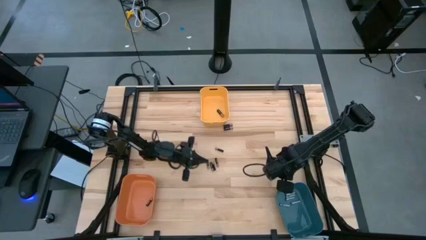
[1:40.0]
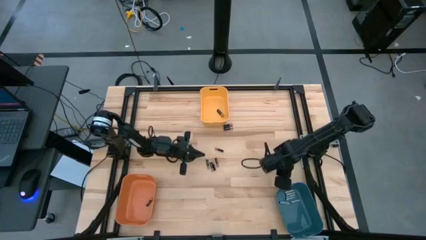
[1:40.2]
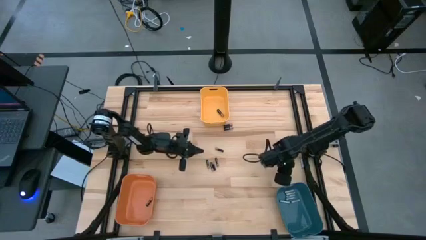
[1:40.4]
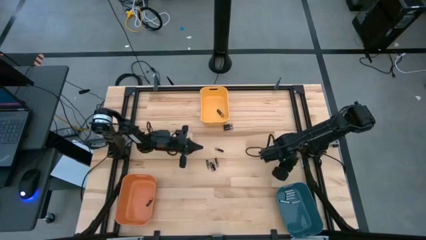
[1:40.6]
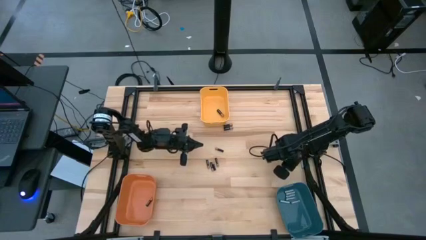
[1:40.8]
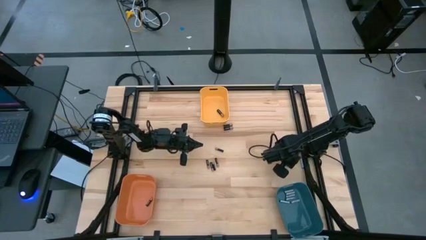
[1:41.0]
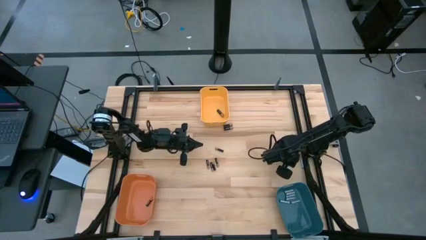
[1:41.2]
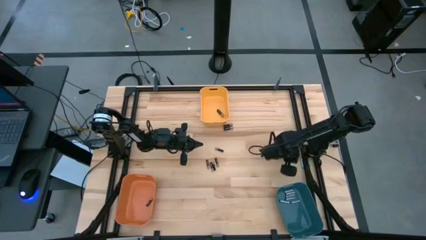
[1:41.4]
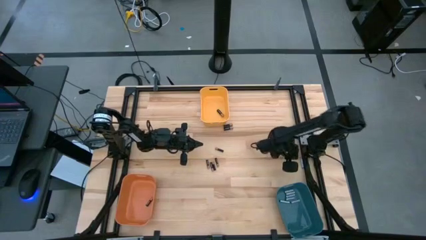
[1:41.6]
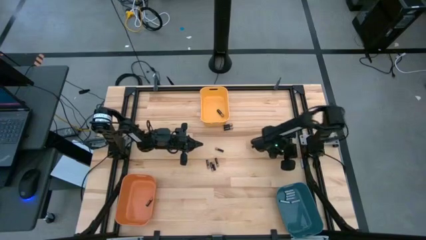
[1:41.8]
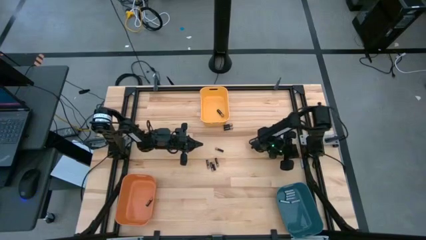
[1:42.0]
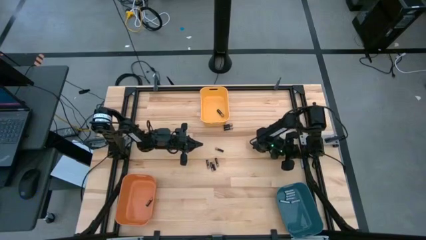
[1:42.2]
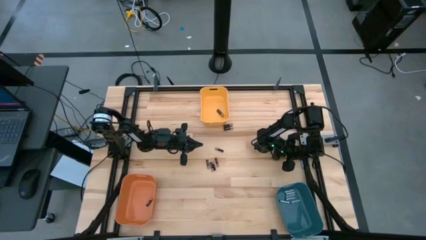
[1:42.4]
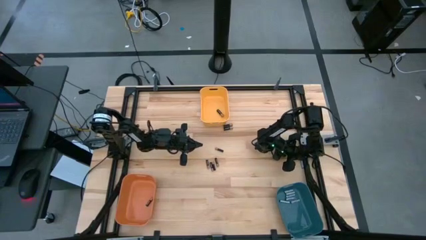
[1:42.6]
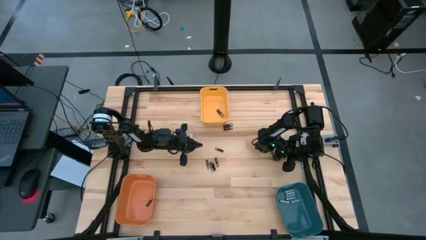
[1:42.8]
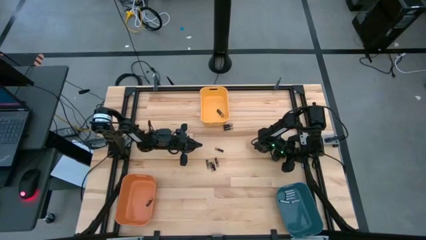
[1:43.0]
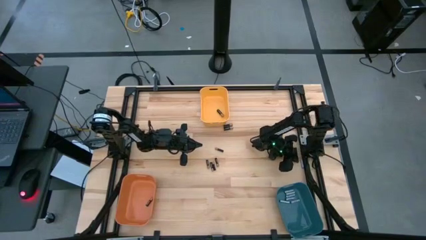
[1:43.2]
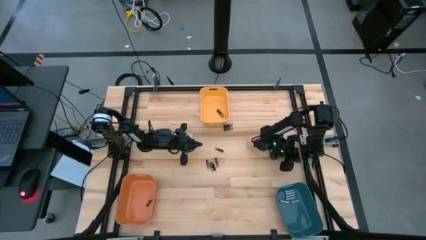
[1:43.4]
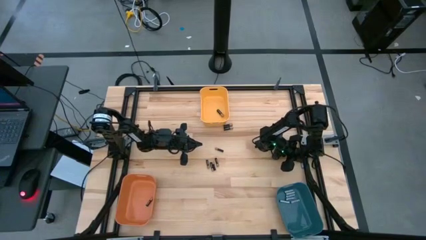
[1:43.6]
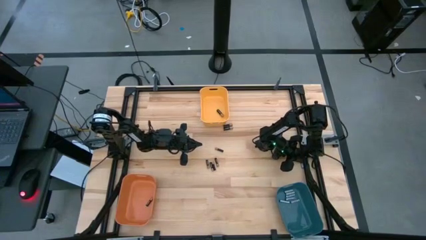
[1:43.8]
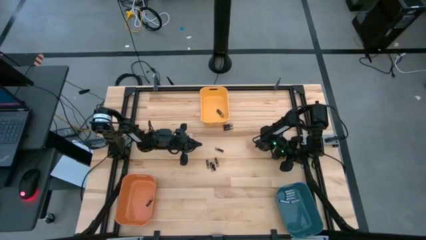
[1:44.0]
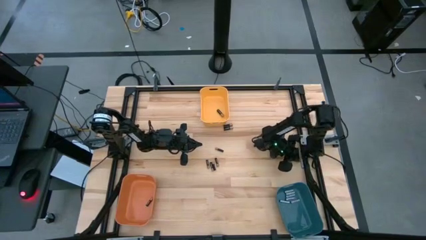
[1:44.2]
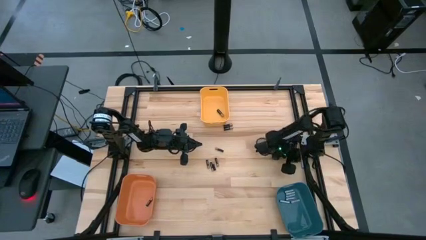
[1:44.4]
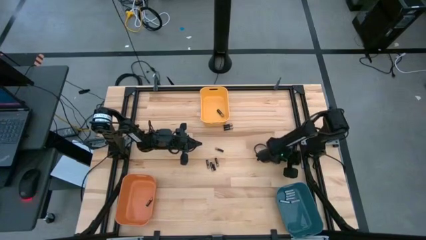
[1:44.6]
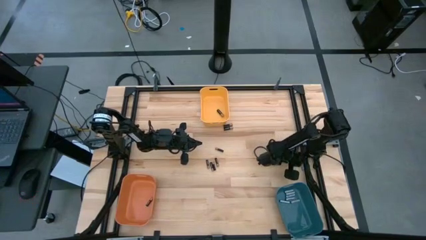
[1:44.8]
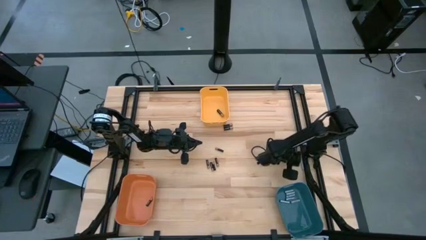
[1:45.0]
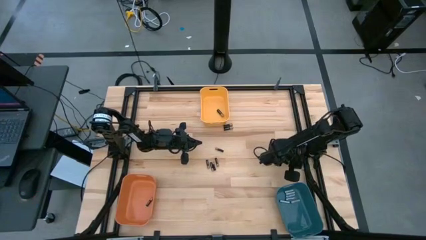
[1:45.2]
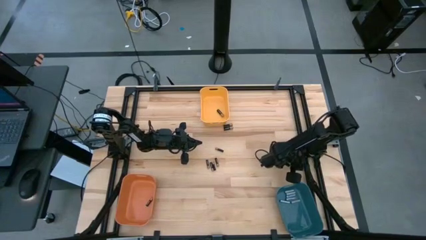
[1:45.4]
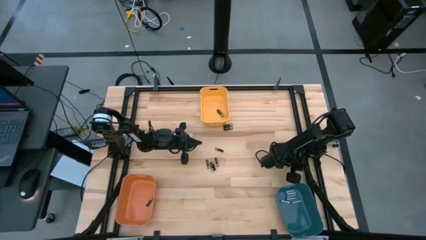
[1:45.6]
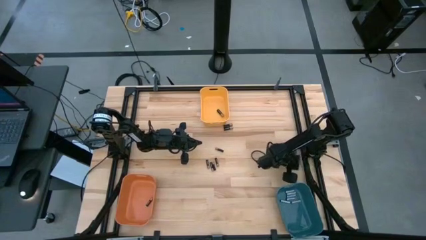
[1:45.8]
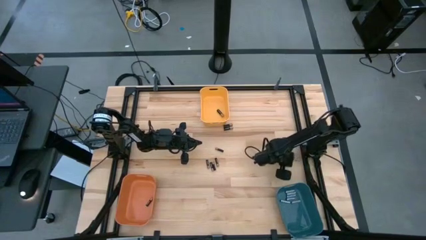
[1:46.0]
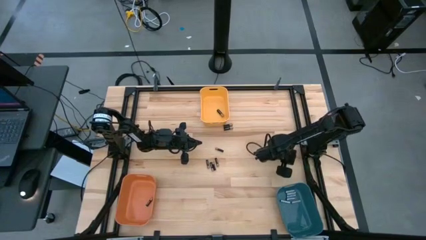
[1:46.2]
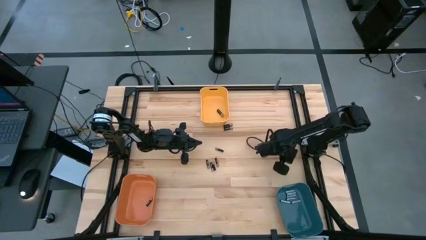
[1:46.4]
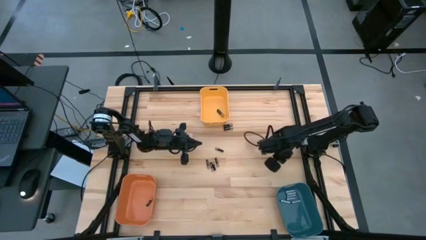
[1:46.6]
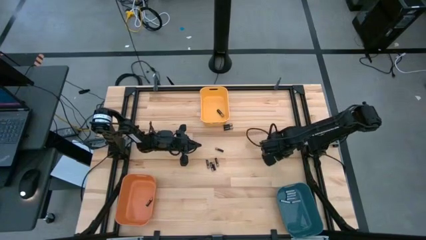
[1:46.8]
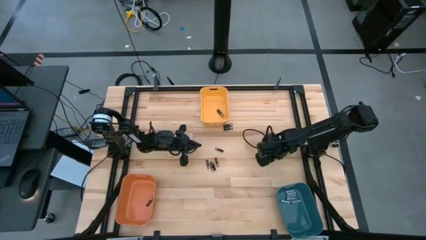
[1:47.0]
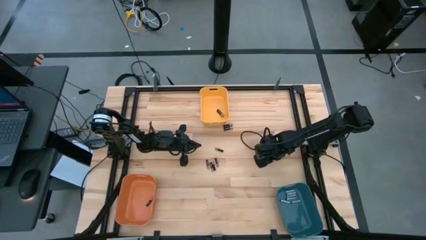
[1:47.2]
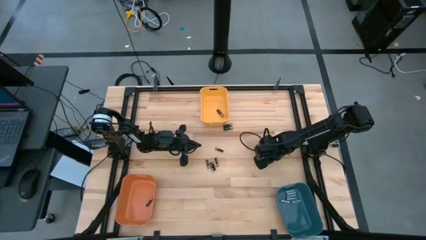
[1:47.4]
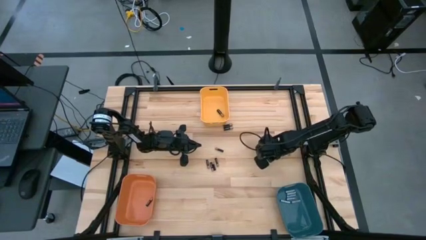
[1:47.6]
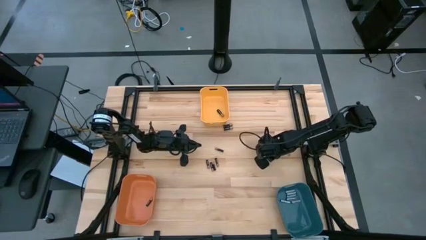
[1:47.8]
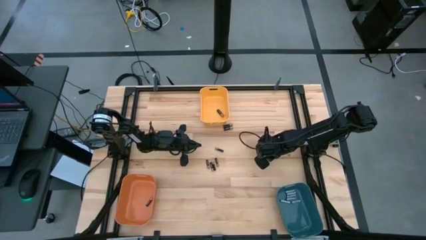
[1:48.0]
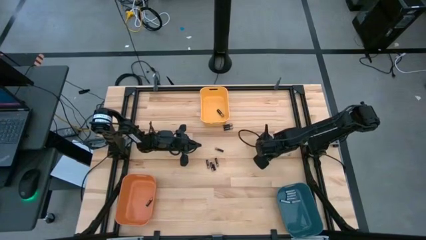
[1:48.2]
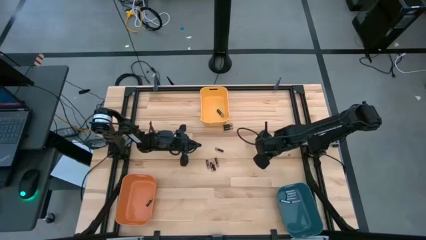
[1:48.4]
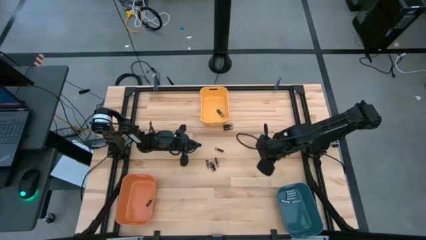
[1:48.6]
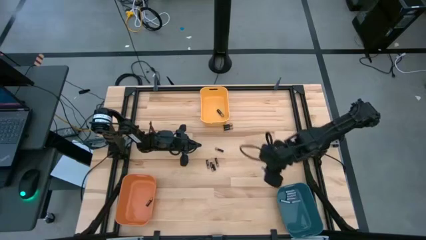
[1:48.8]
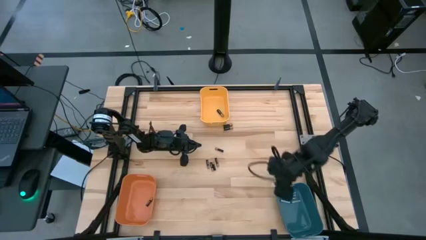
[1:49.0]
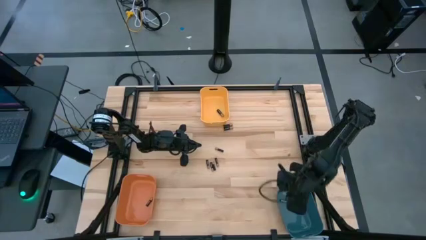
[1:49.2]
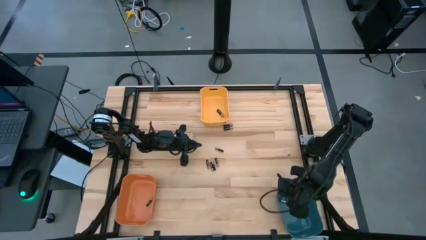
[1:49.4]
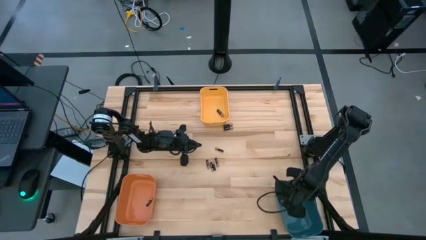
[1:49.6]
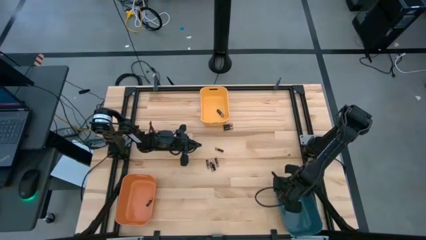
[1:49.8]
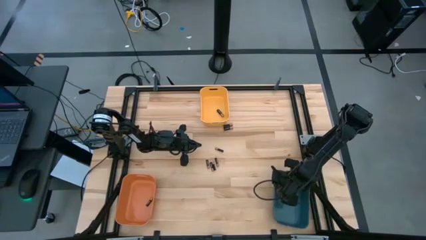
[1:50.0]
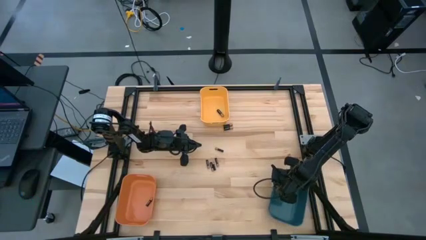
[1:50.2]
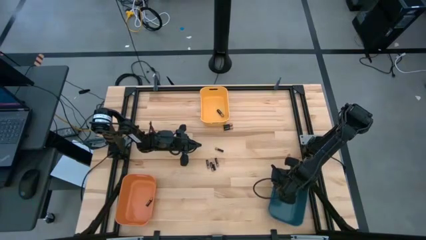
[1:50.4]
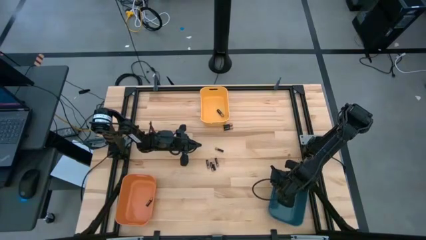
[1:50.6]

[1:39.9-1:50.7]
Task: Sort batteries
Put the white battery into the blue bin

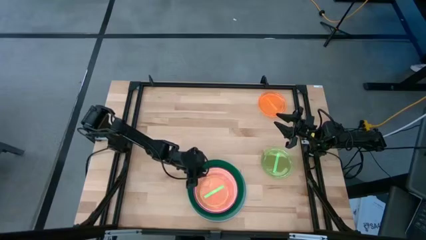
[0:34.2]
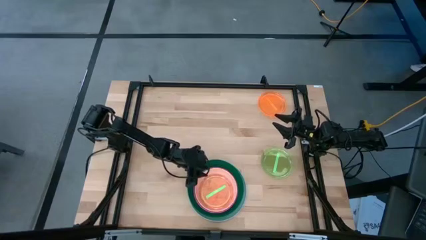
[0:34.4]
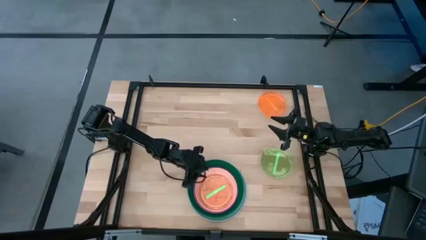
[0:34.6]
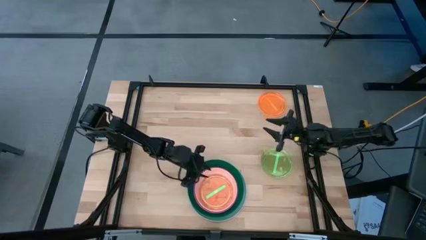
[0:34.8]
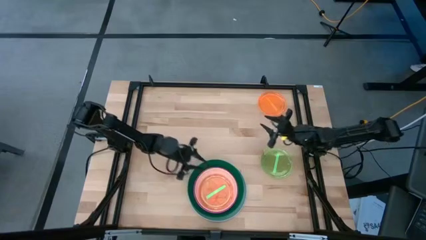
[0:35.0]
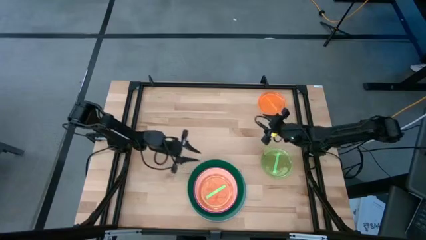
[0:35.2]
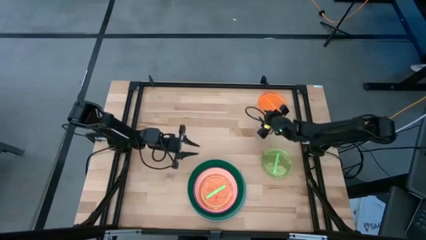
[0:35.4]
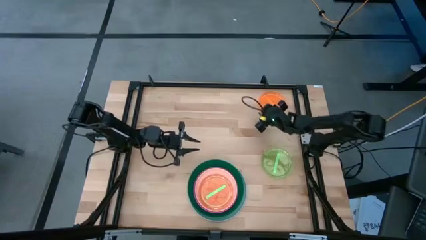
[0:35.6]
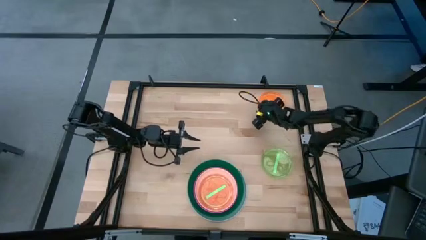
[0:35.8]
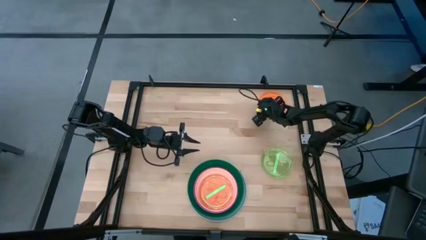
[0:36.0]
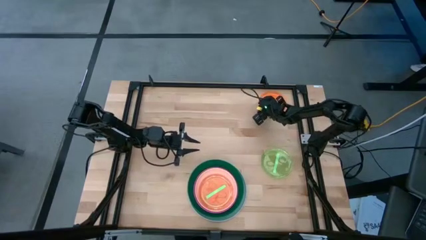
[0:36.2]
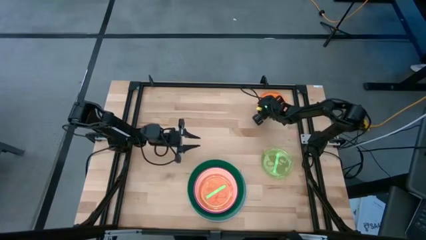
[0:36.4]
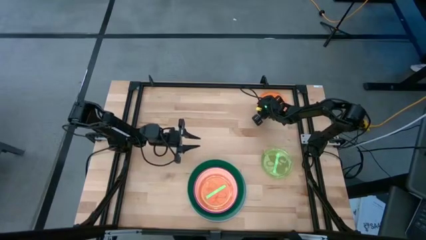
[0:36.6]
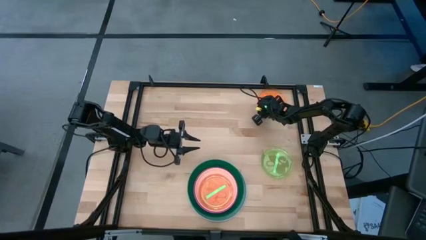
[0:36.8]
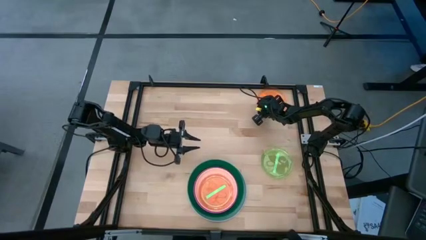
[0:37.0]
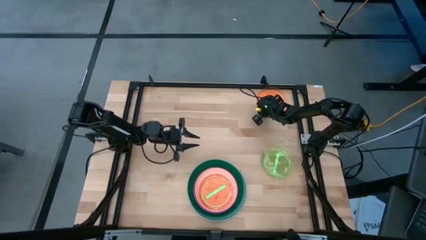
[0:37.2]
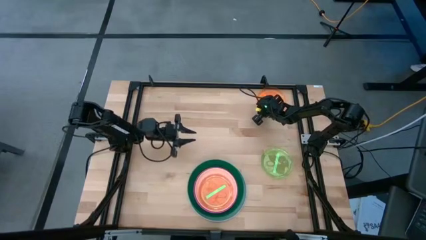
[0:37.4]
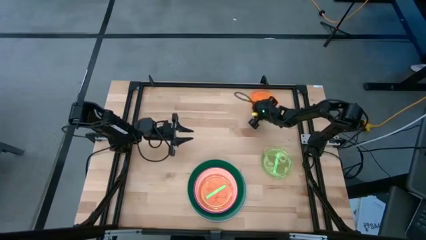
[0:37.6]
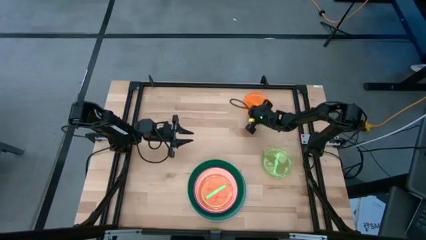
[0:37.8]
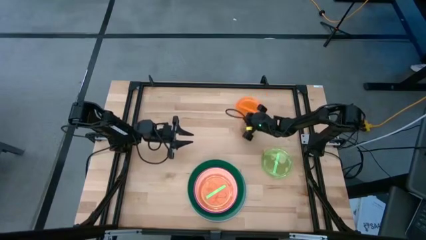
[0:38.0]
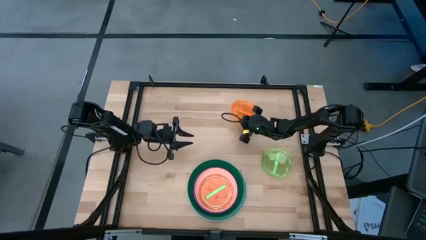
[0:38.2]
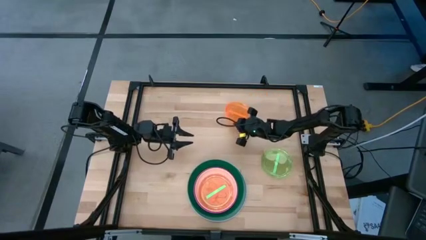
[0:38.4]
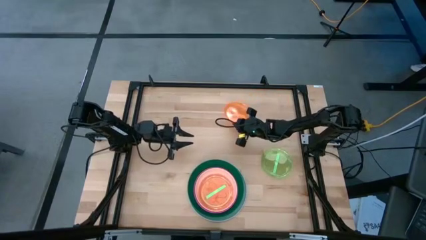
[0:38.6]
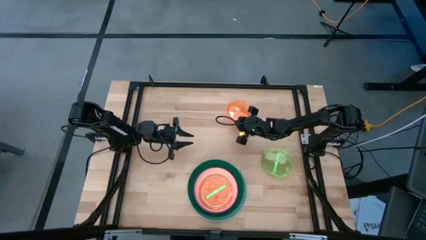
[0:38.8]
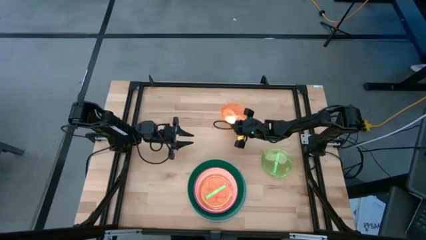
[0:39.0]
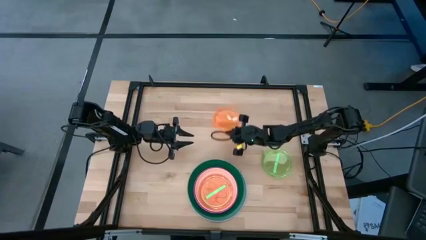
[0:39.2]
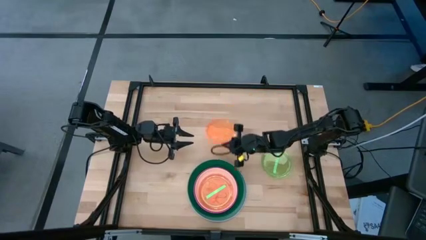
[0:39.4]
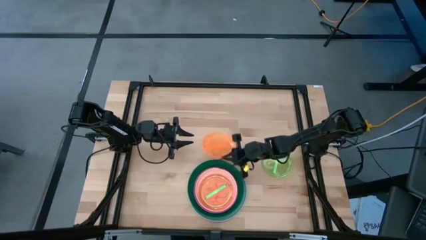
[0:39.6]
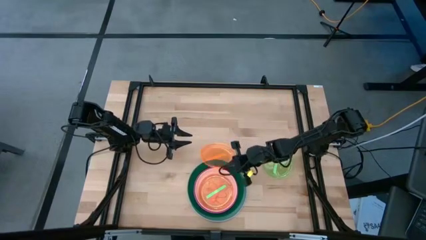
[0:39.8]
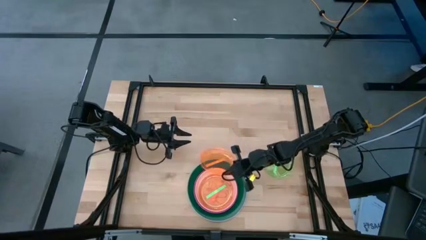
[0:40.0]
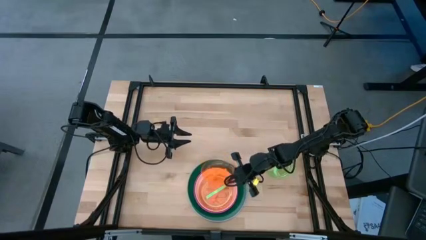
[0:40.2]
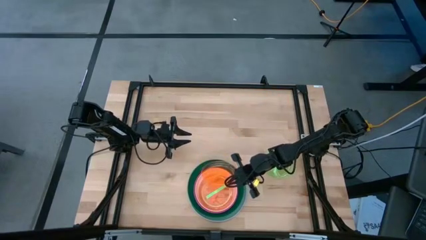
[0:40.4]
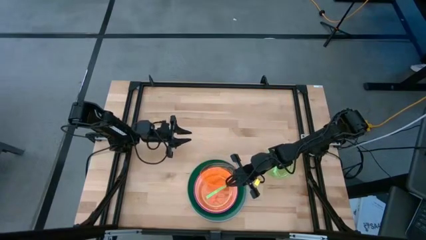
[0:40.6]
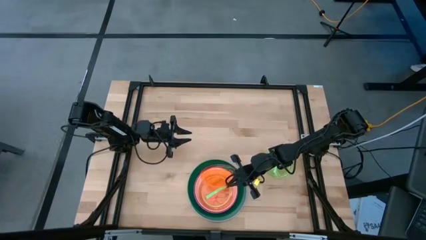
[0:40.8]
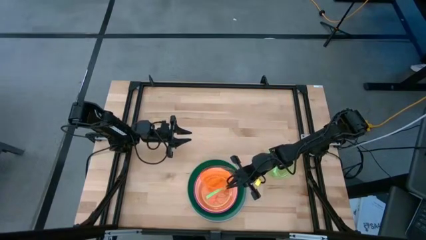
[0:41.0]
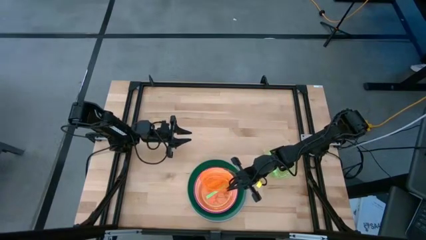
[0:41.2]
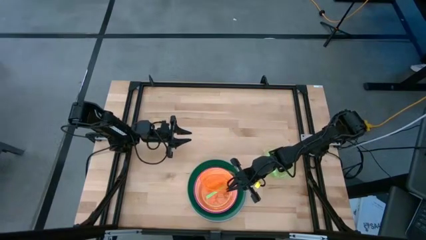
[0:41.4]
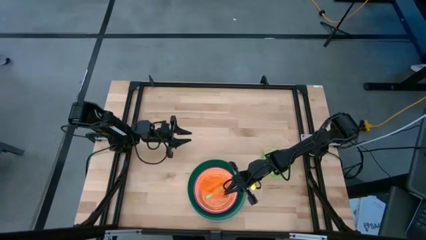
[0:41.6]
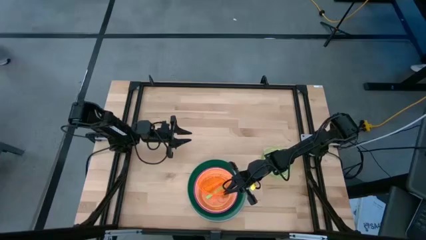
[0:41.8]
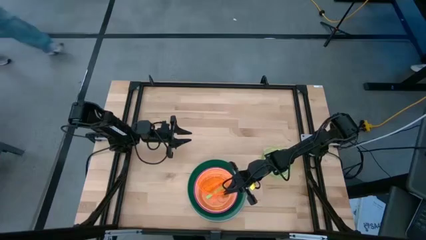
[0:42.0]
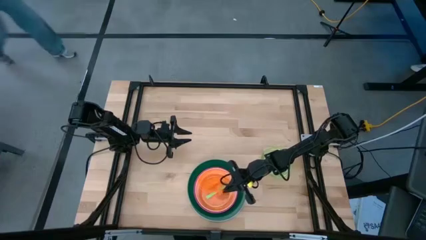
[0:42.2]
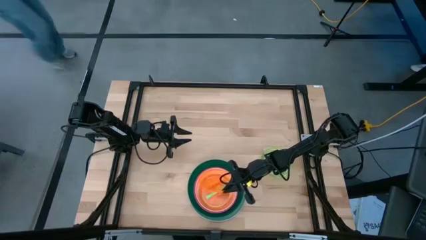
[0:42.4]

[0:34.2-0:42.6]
Task: Stack plastic plates
Stack the transparent orange plate on the transparent green plate
